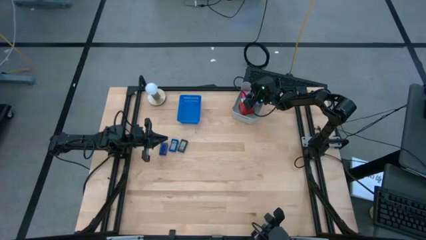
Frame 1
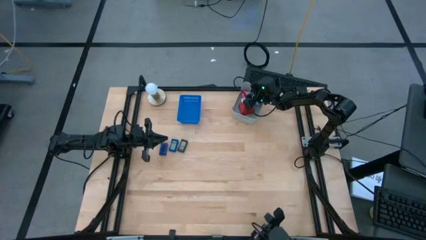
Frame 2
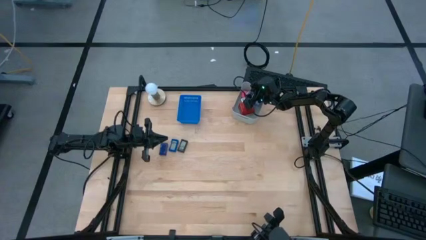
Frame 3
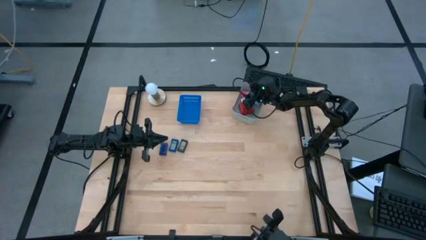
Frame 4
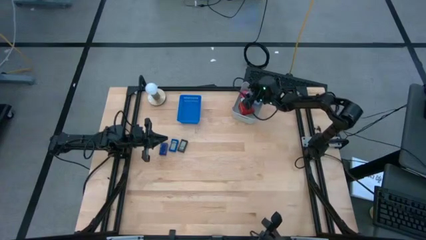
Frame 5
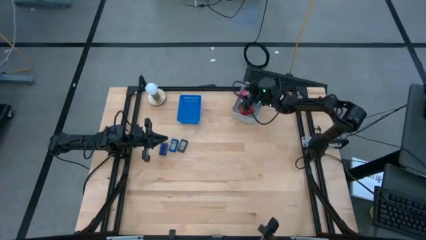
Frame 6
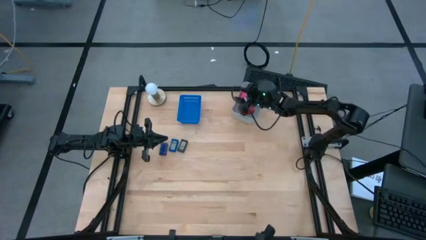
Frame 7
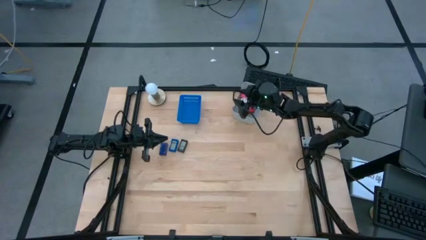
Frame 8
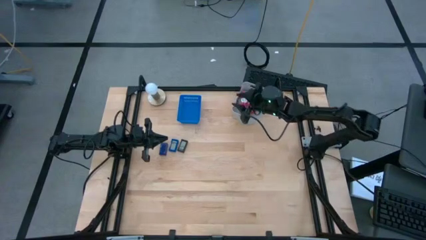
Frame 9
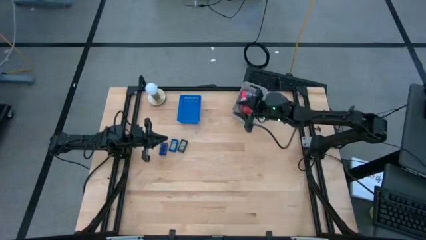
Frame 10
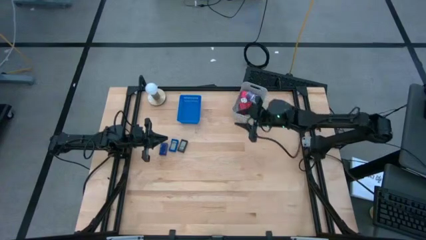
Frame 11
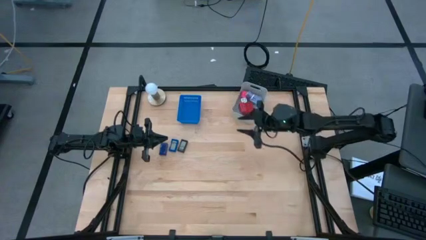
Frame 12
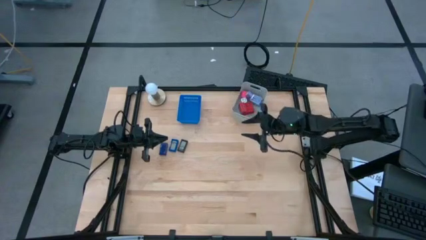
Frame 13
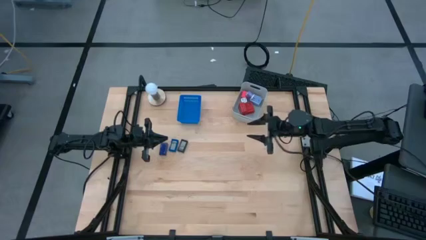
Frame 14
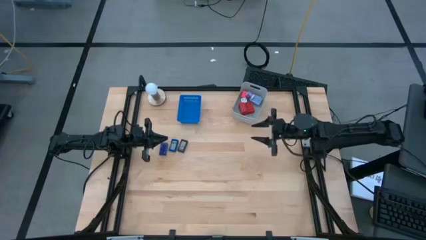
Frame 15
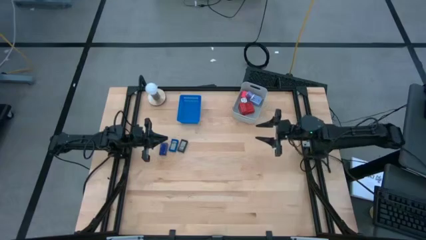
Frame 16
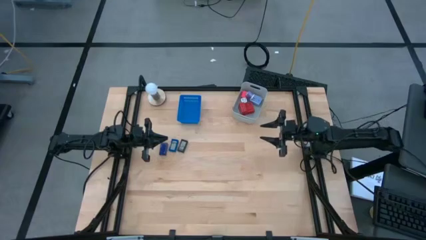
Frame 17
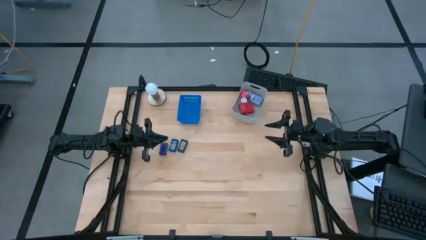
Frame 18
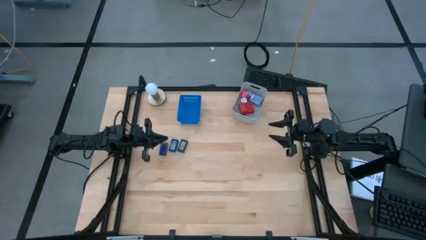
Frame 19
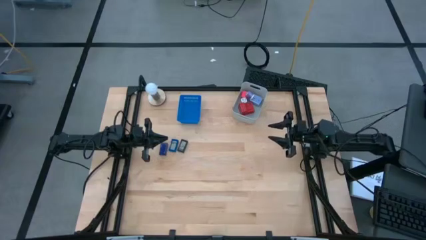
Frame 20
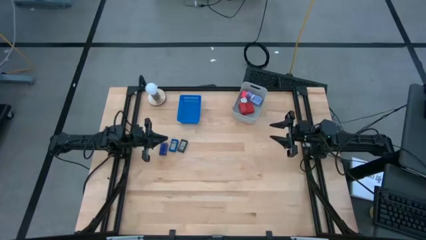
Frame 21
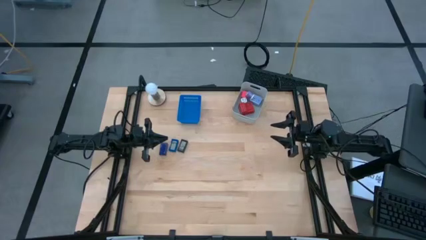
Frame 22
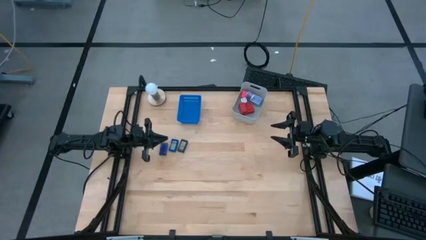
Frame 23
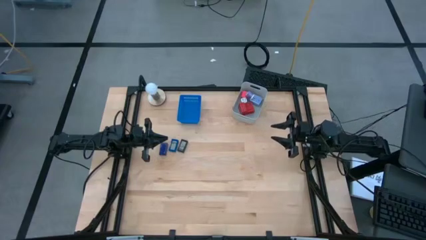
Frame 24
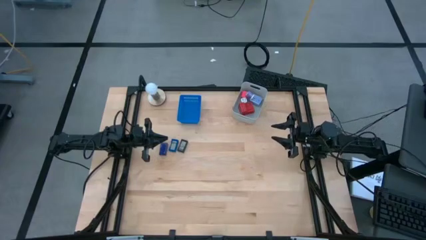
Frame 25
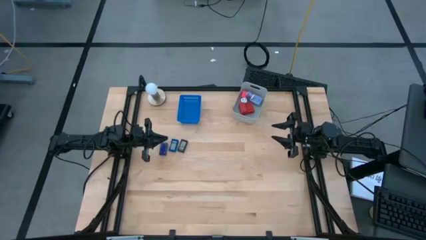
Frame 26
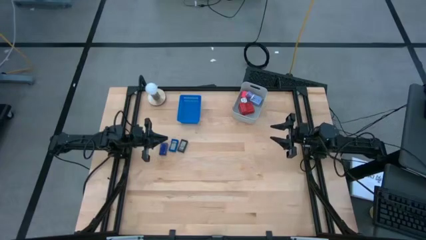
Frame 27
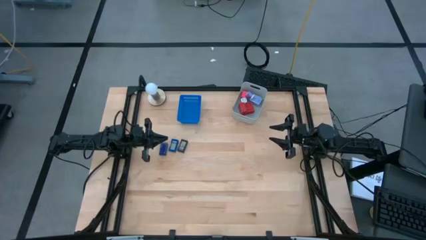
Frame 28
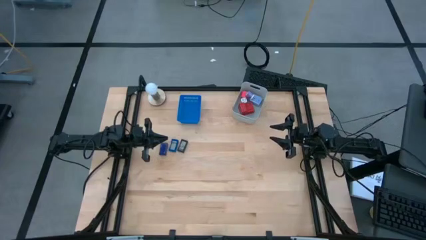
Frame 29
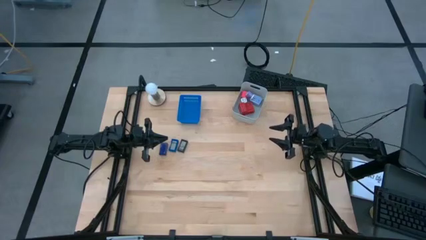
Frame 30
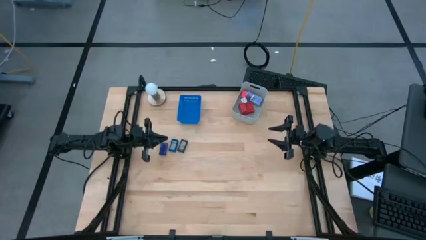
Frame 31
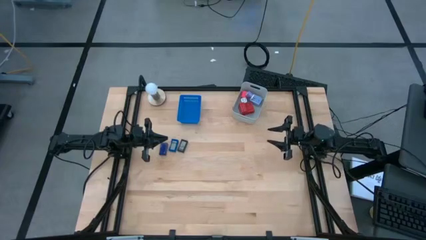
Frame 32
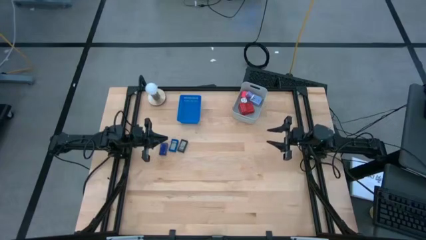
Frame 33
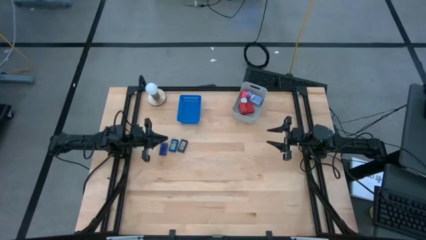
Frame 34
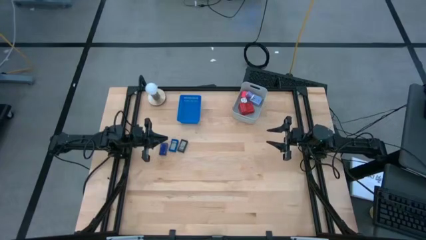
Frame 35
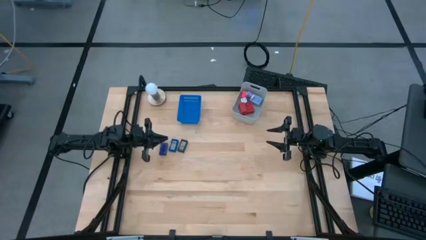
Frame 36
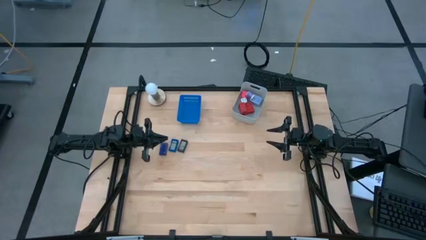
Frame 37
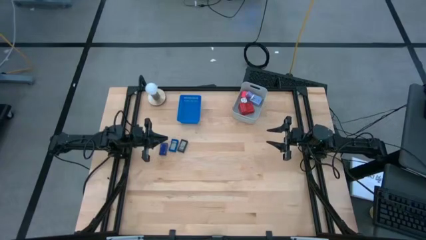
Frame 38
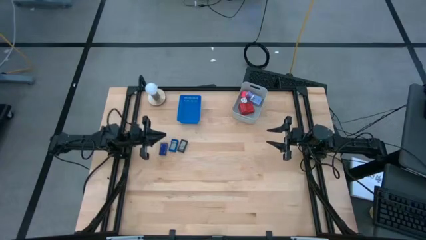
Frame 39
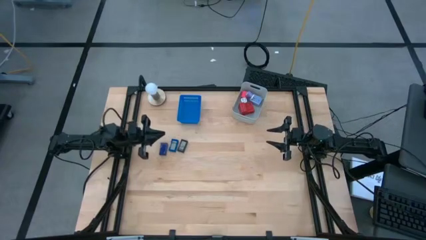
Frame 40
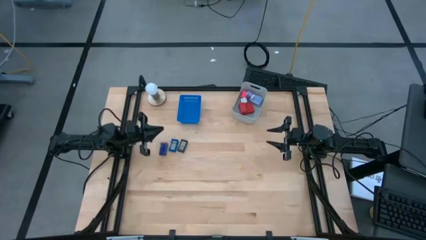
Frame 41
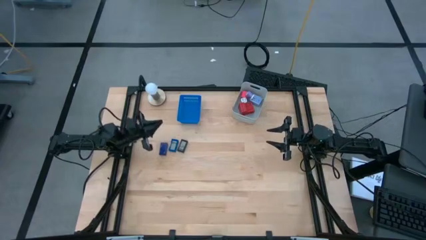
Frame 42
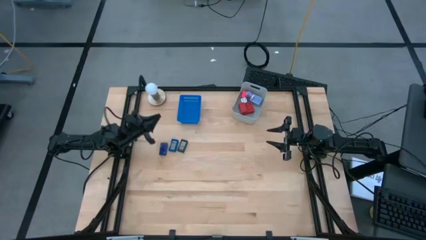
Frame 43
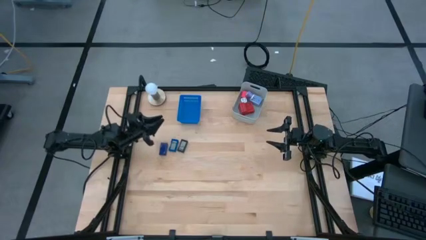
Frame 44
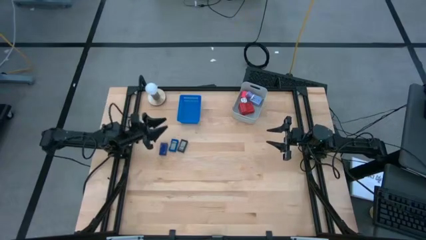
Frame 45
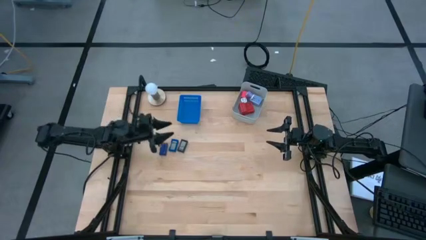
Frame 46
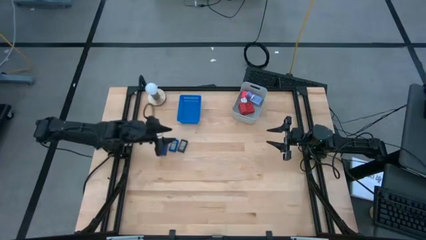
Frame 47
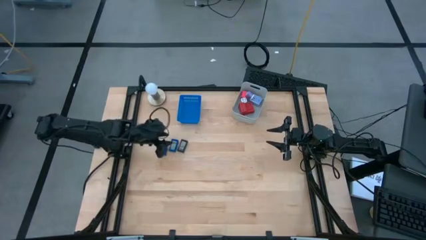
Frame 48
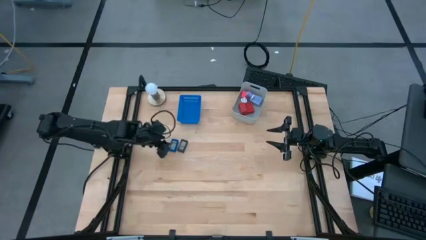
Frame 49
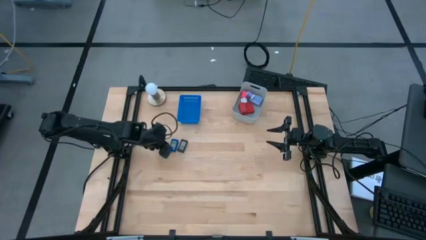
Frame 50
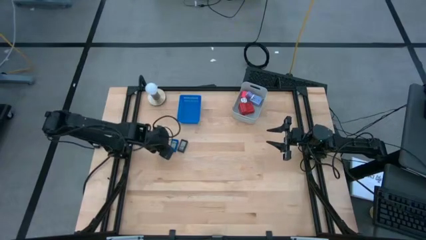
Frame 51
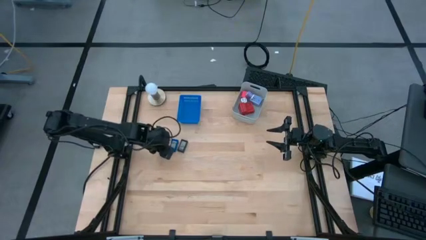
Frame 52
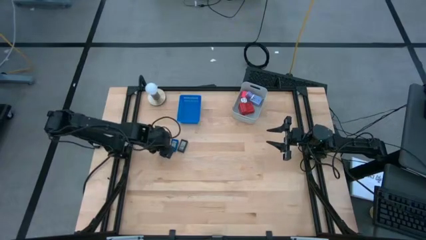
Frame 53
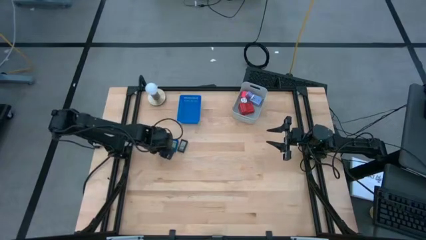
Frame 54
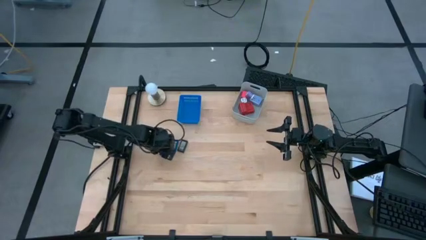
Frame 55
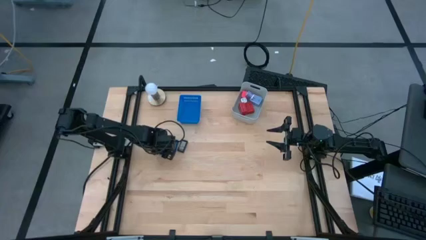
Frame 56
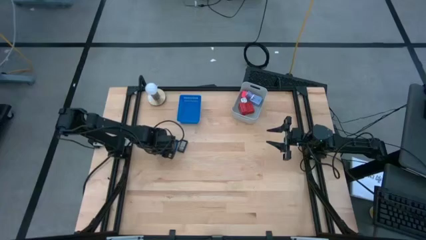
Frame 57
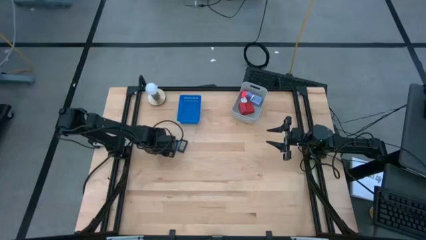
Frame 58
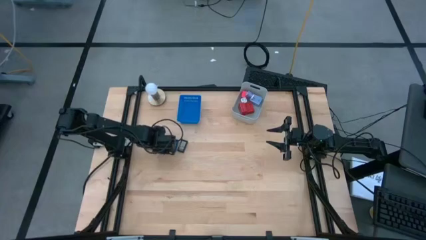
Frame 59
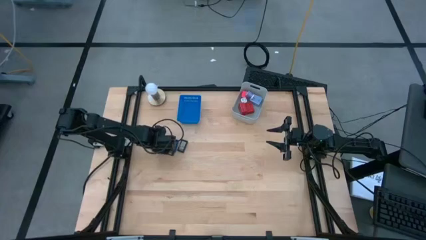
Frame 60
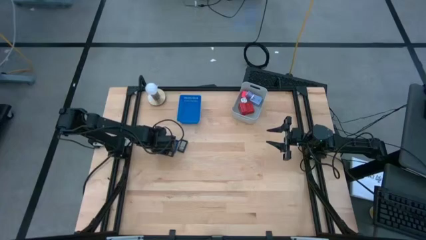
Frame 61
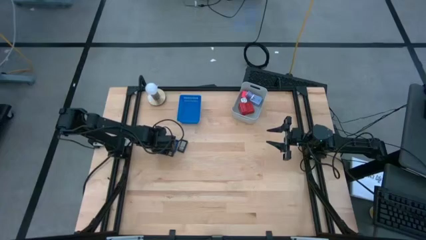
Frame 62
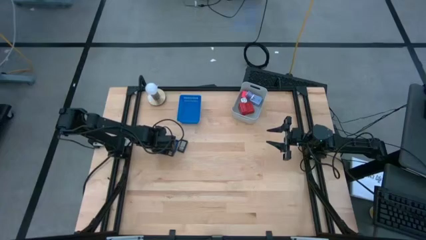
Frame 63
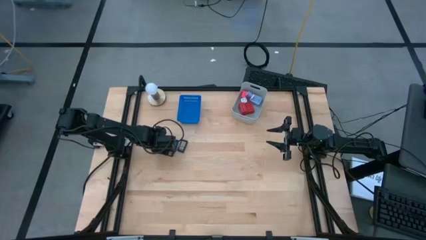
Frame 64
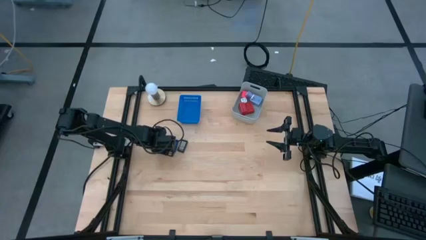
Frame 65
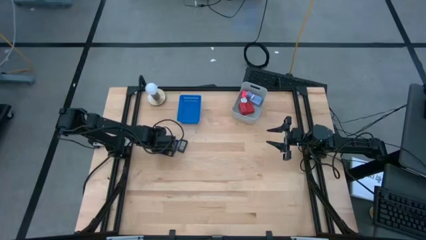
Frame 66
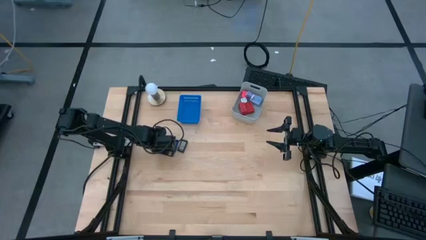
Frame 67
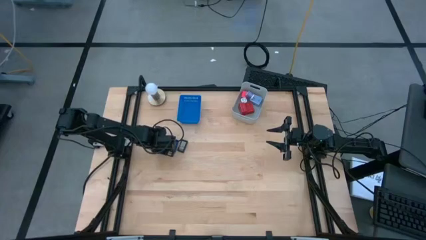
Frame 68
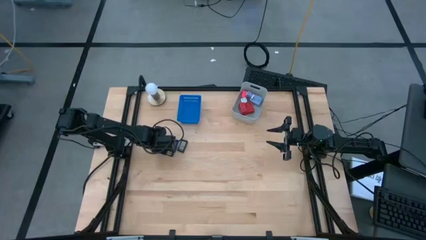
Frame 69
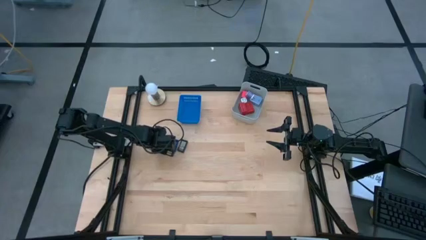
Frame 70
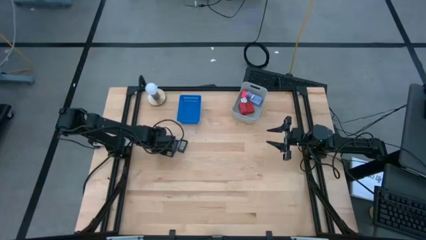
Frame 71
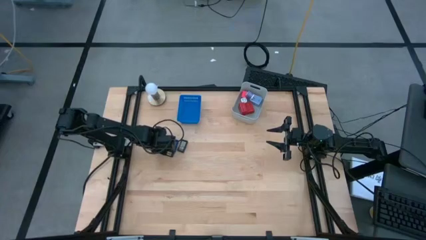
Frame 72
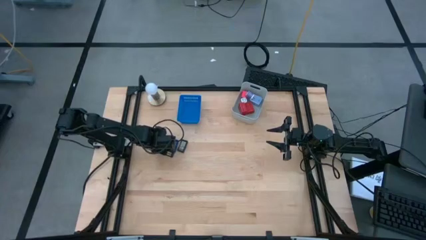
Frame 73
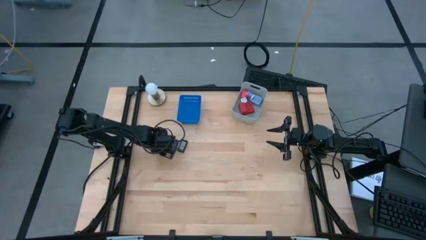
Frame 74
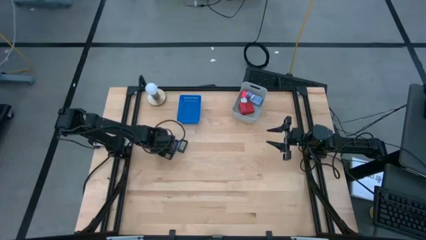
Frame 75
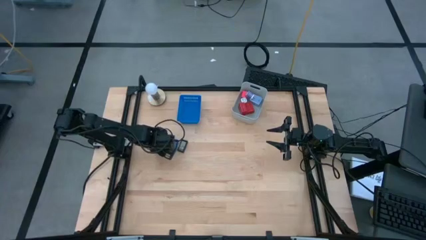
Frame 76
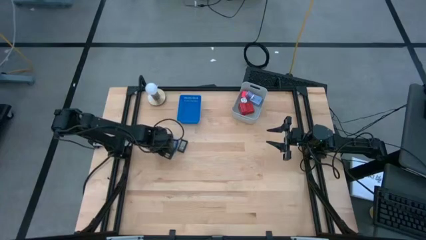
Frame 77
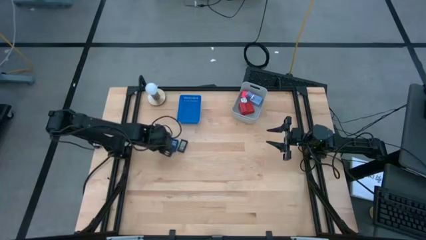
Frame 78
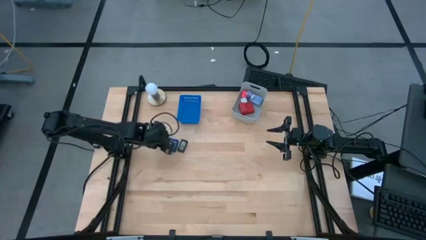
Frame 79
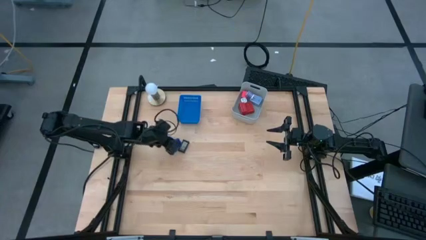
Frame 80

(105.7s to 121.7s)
Task: Pick & Place Office items
Put the left blue digital clock into the blue bin
